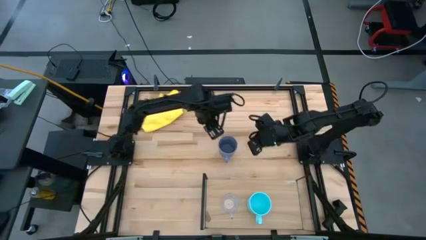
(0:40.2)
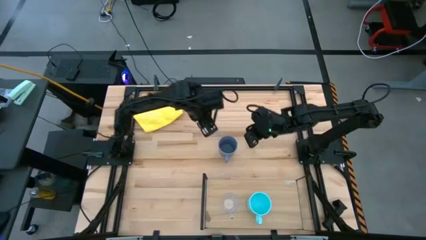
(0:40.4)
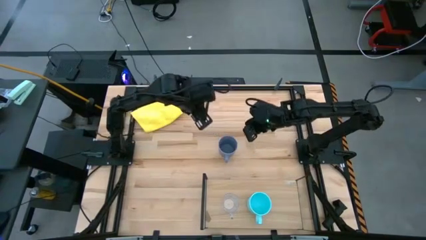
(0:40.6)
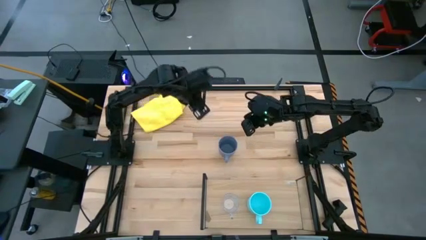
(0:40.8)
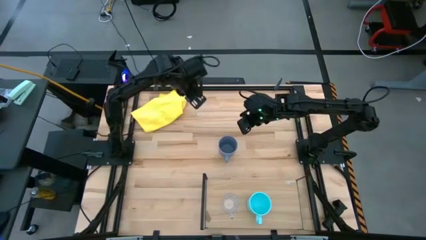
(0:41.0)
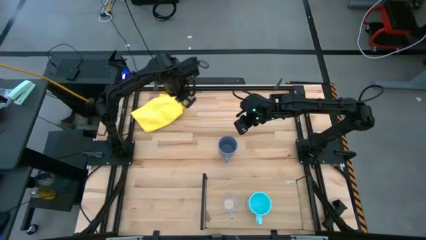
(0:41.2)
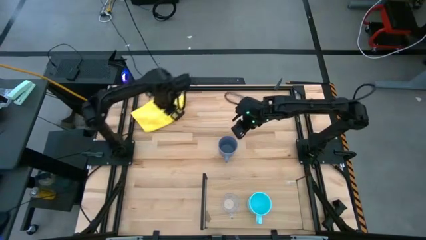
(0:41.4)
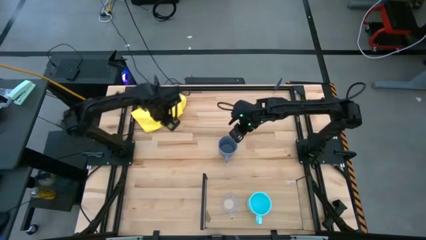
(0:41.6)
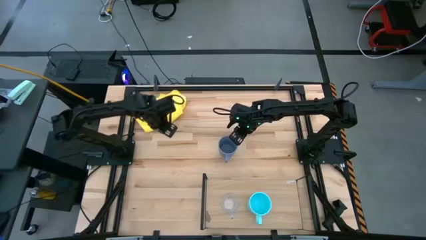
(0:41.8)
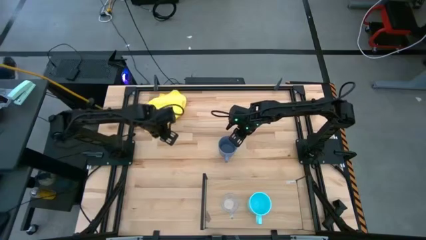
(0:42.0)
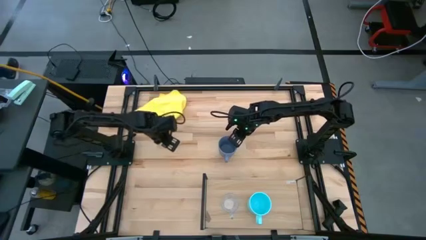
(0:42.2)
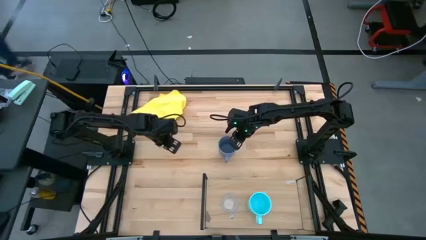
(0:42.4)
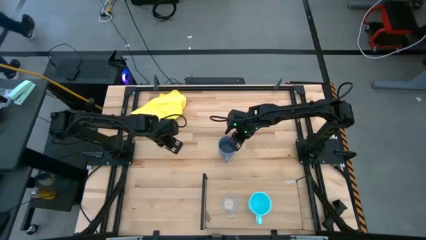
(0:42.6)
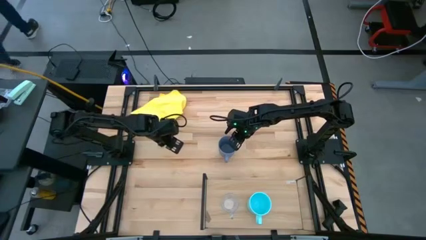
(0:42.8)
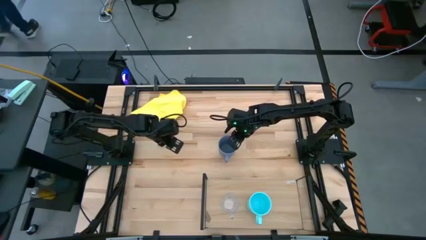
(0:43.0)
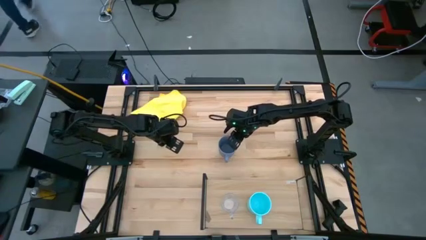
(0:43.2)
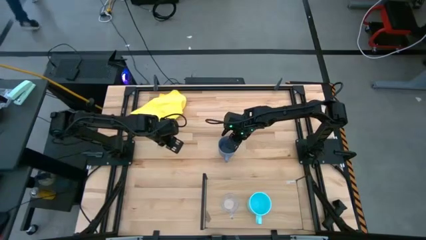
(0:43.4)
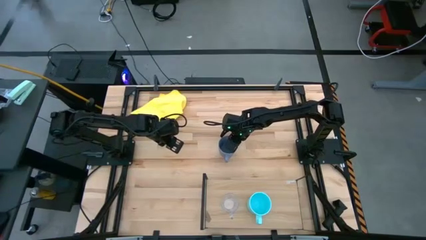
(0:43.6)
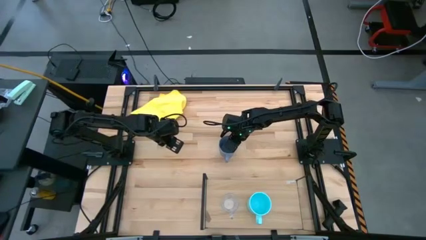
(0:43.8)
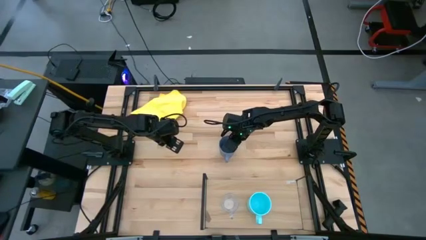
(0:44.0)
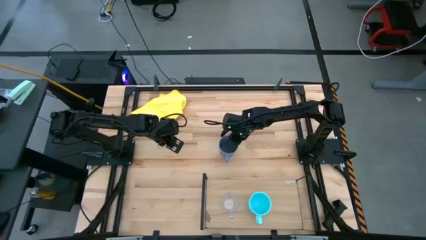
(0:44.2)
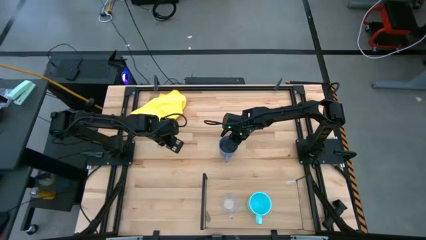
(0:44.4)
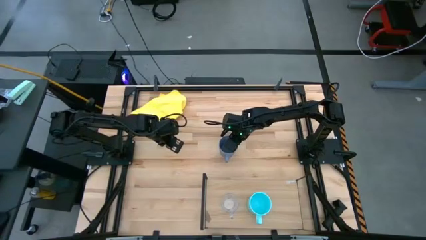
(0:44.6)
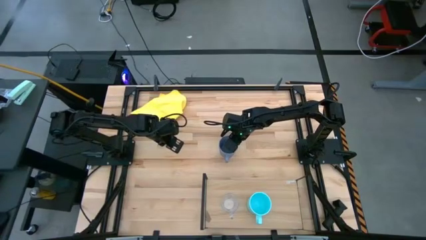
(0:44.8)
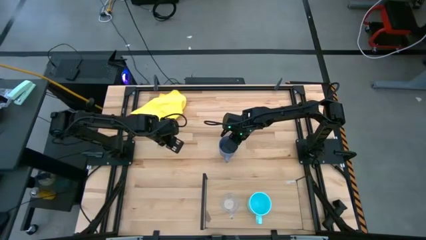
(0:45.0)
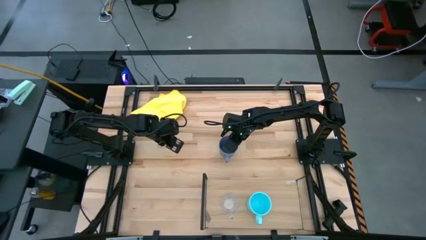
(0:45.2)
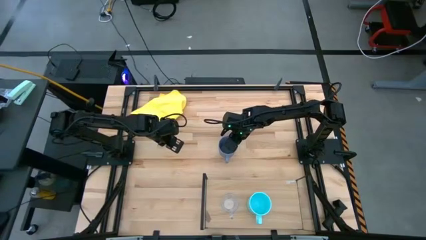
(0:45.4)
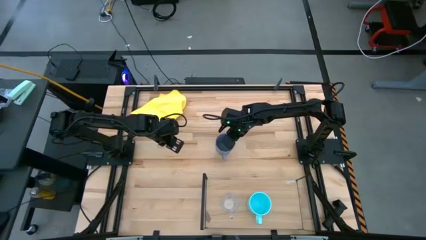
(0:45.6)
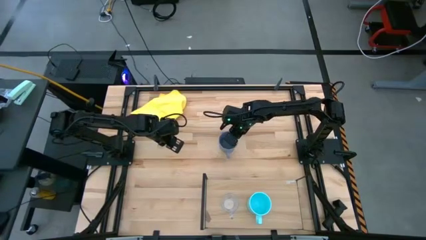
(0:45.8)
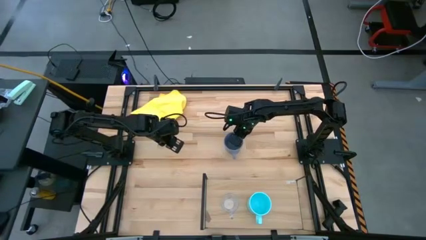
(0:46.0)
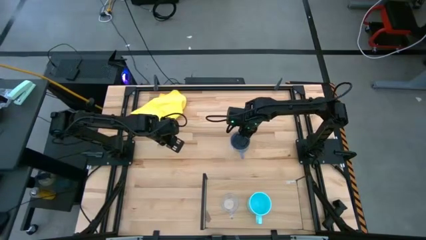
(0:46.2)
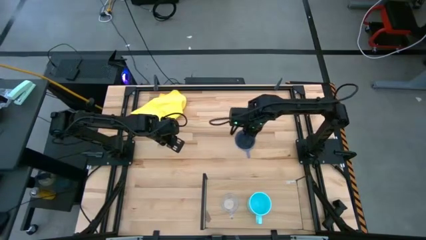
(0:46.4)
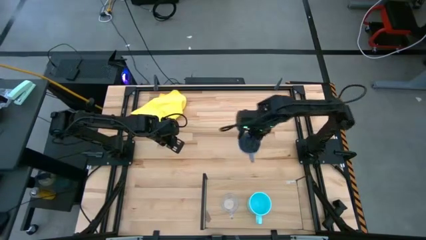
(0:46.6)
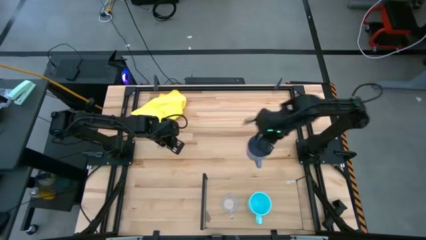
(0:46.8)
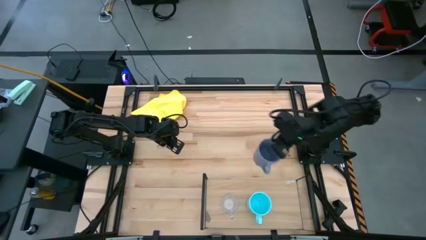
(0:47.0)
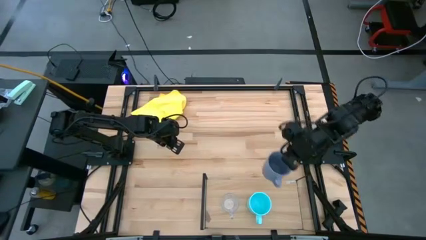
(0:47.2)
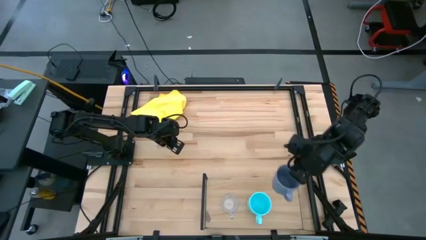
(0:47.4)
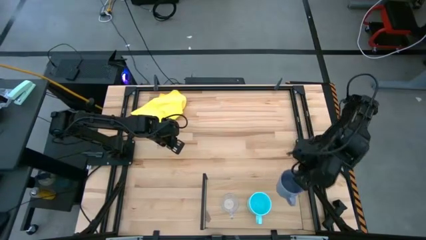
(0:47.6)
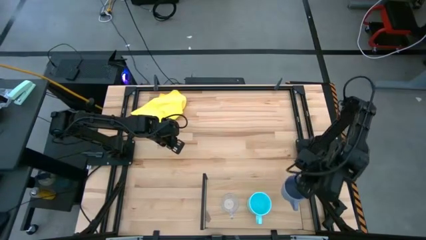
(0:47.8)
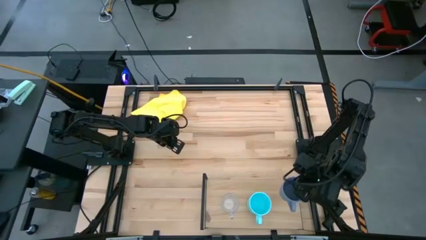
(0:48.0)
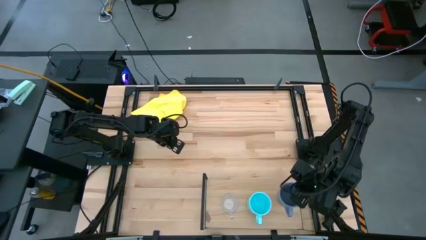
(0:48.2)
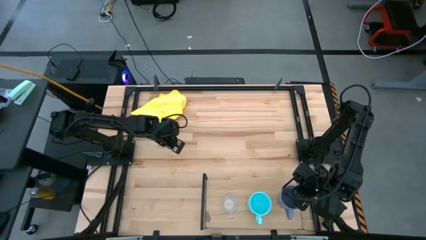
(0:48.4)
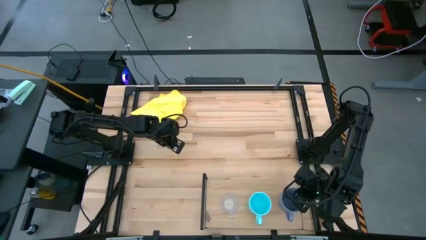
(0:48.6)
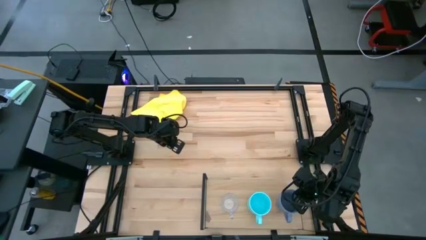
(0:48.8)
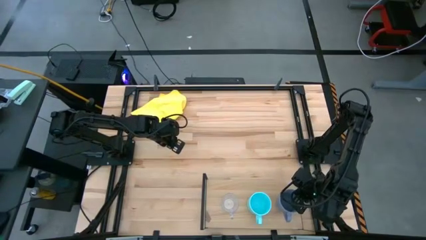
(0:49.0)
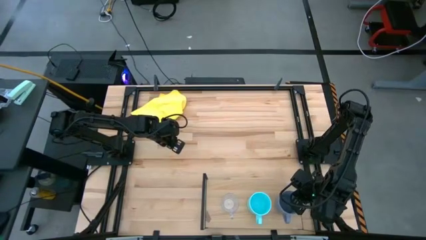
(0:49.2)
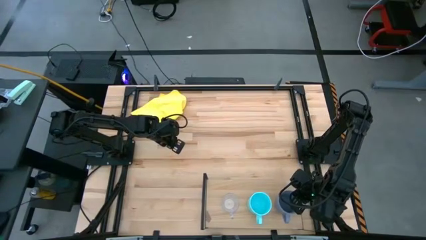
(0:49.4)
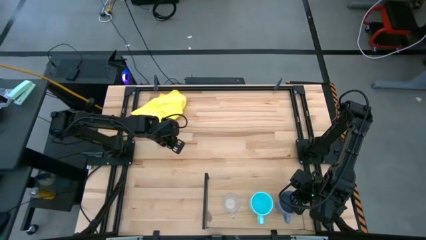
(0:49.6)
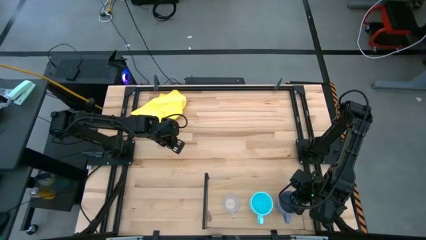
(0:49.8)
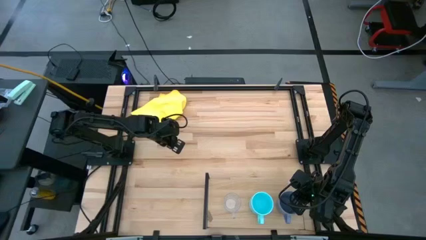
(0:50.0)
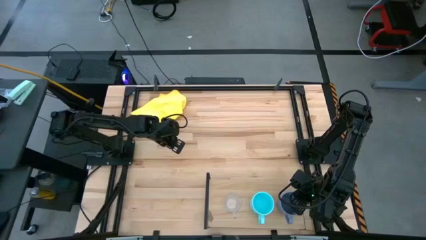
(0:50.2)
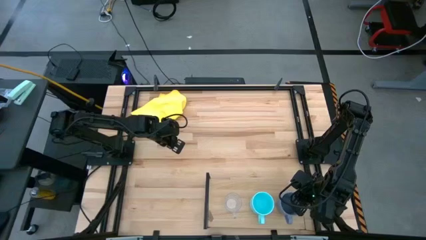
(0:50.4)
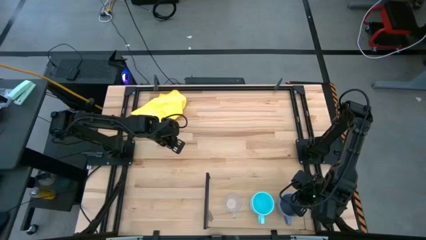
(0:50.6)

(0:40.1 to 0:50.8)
Task: Stack small to large cups/mugs on shelf
Put the violet mug on the shelf
